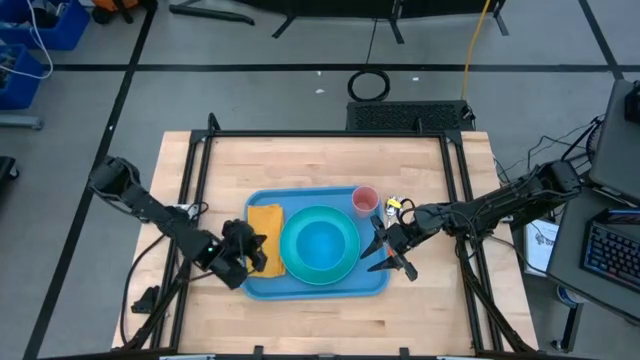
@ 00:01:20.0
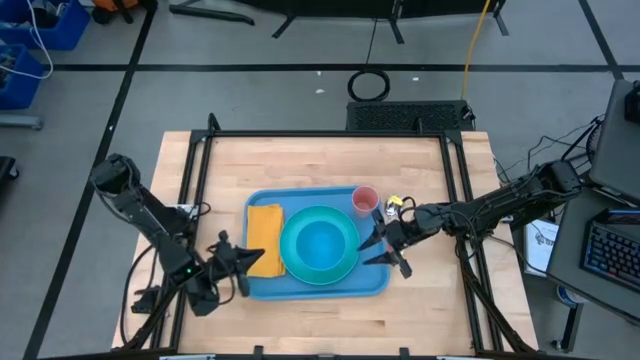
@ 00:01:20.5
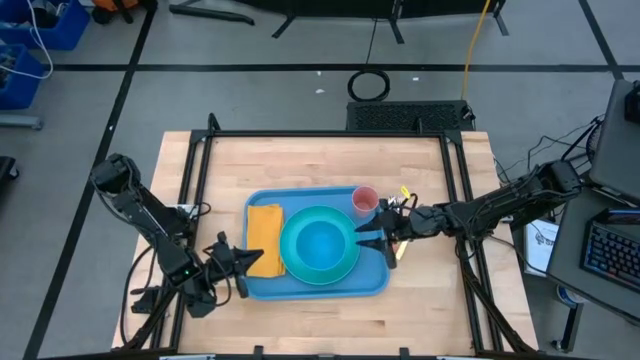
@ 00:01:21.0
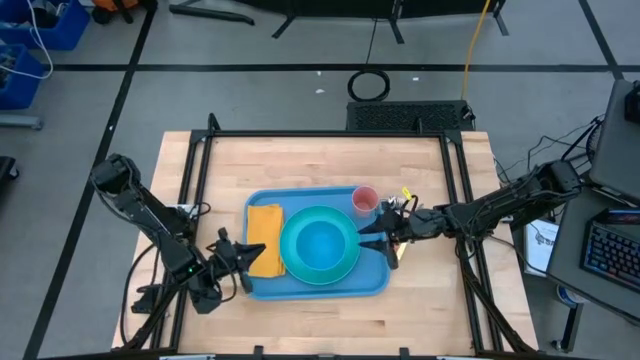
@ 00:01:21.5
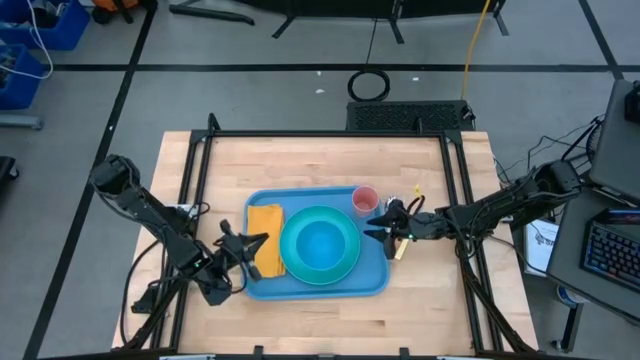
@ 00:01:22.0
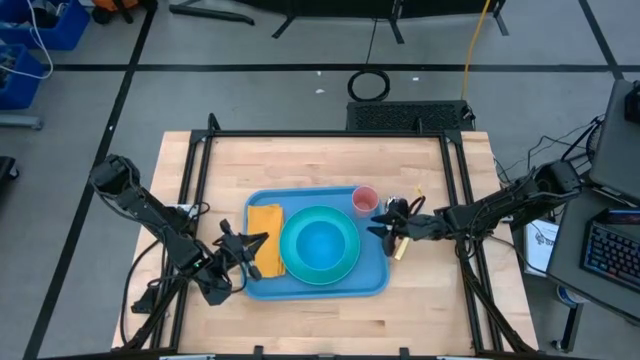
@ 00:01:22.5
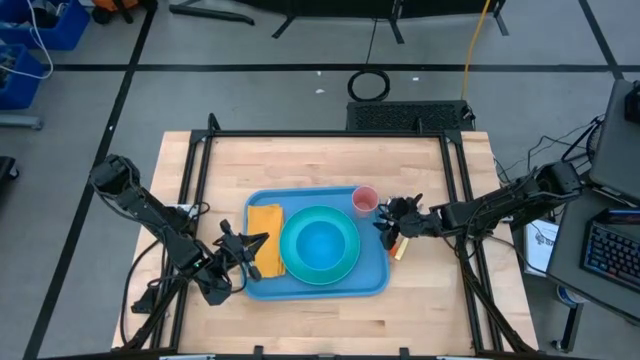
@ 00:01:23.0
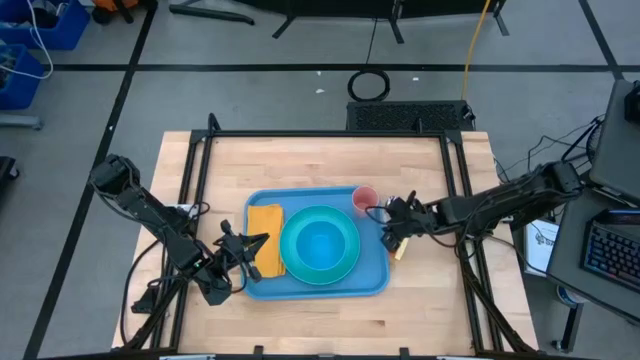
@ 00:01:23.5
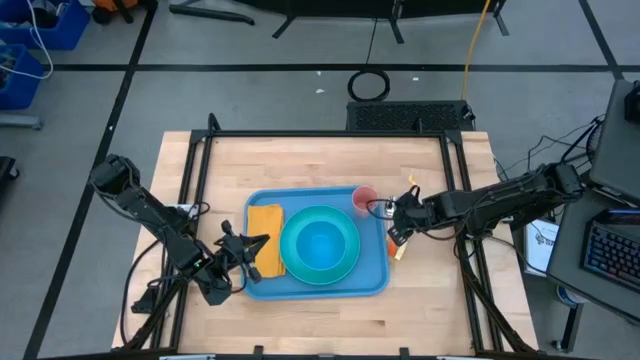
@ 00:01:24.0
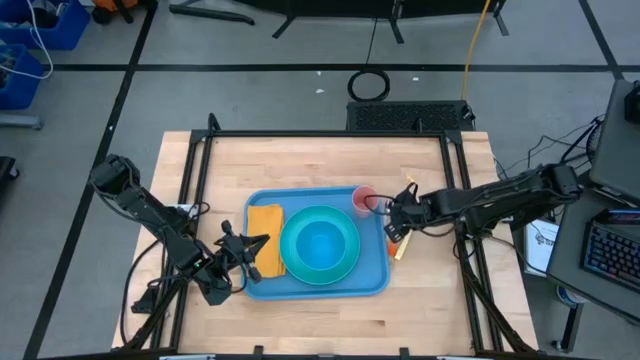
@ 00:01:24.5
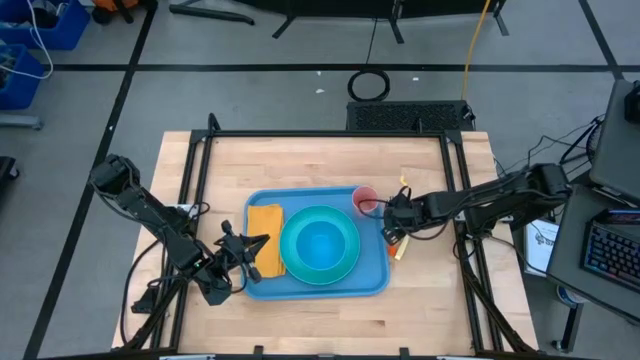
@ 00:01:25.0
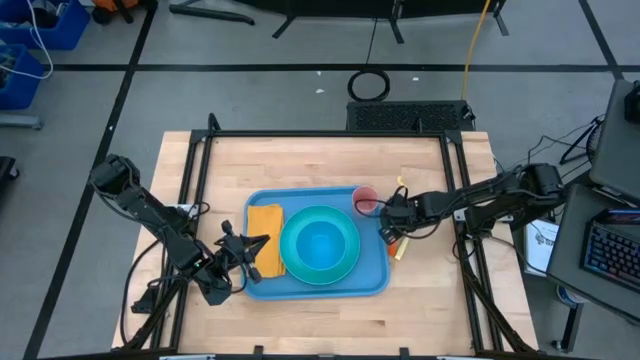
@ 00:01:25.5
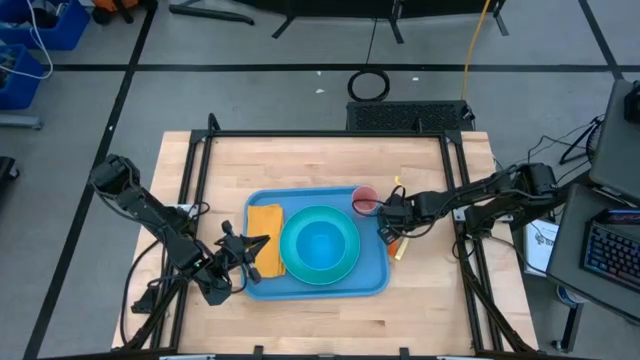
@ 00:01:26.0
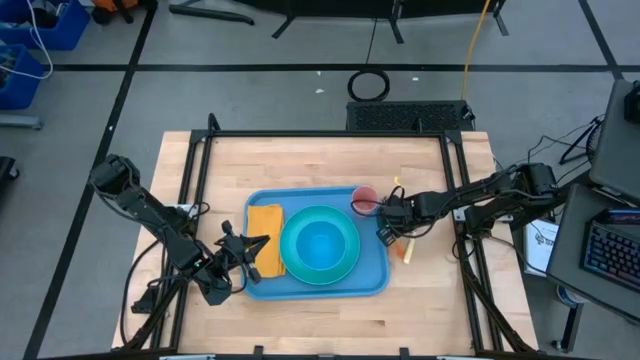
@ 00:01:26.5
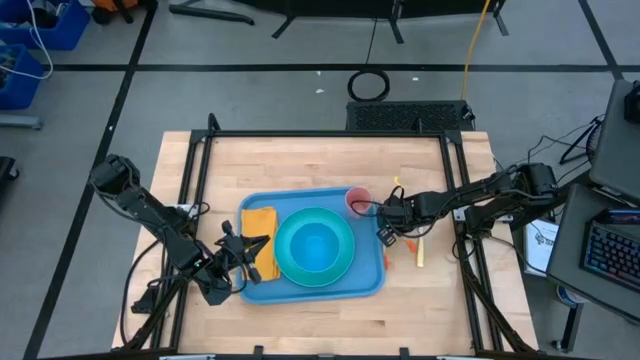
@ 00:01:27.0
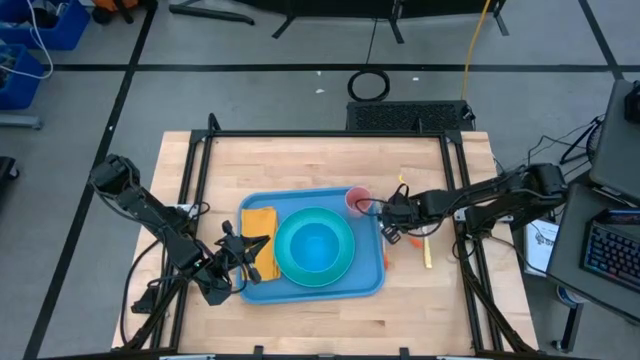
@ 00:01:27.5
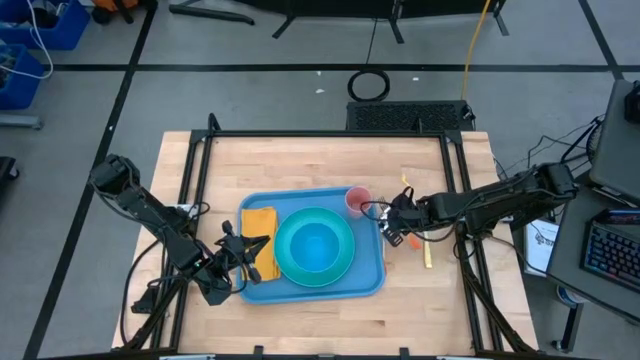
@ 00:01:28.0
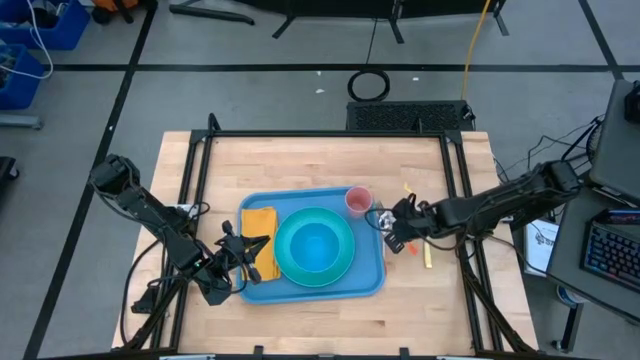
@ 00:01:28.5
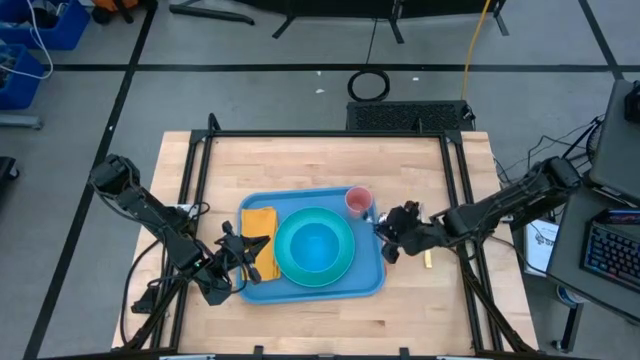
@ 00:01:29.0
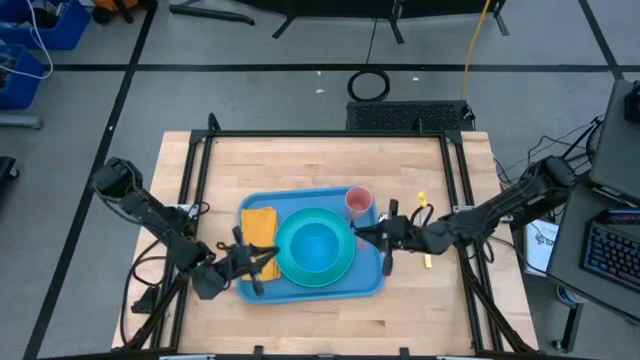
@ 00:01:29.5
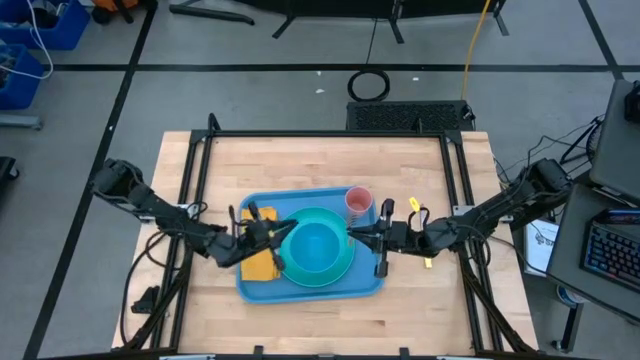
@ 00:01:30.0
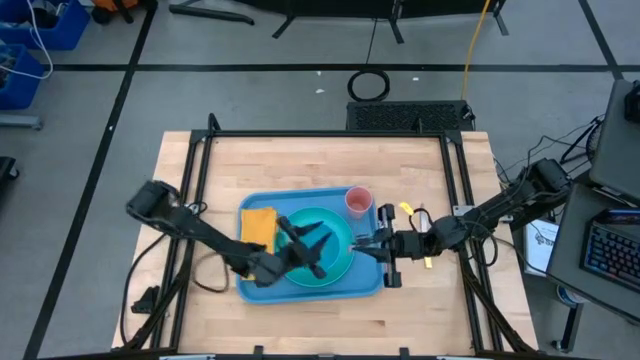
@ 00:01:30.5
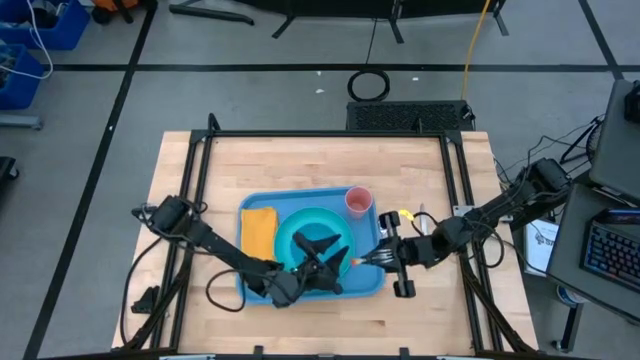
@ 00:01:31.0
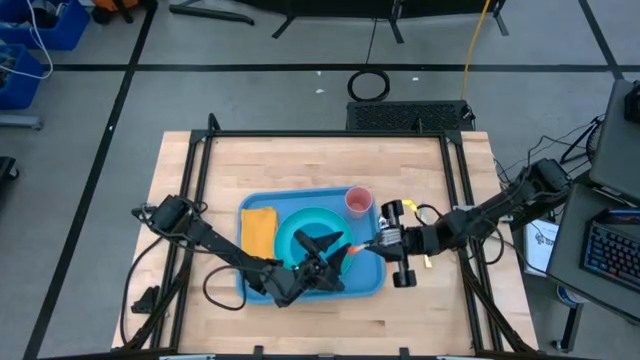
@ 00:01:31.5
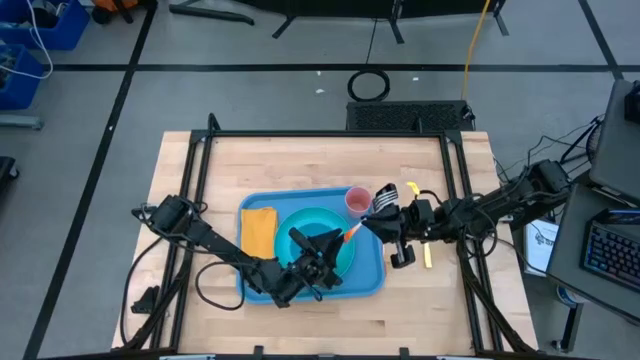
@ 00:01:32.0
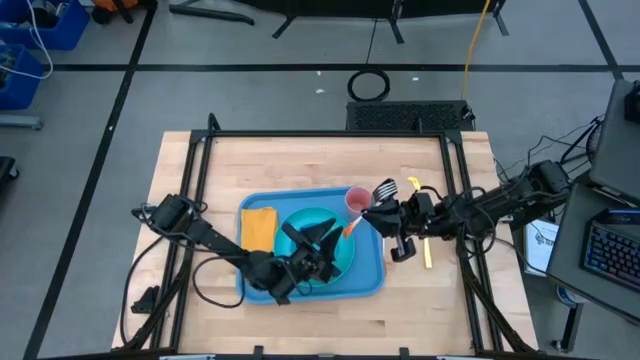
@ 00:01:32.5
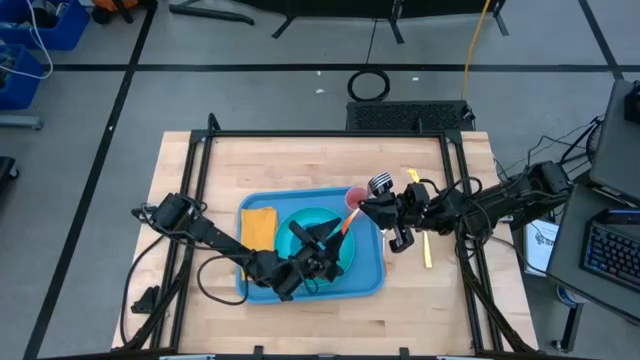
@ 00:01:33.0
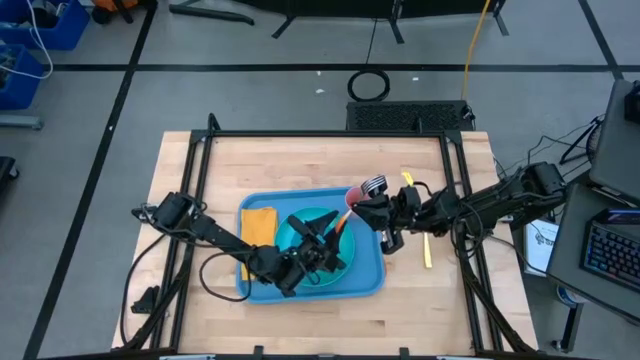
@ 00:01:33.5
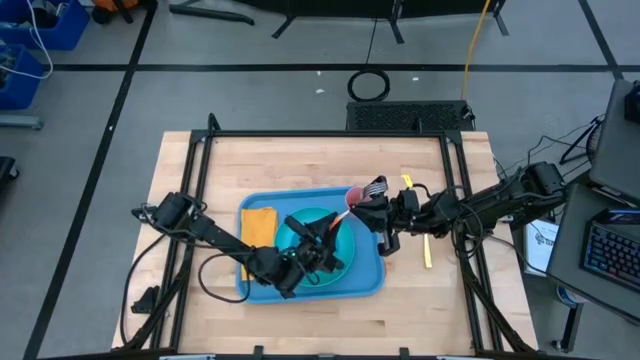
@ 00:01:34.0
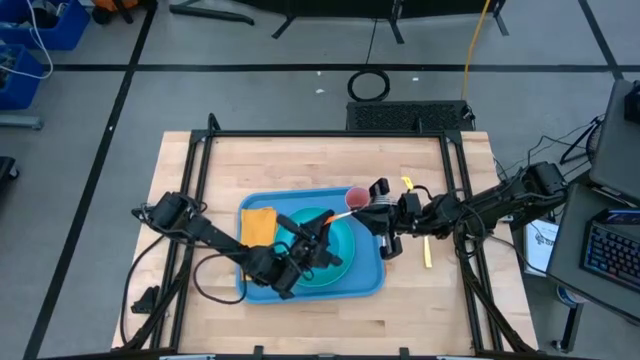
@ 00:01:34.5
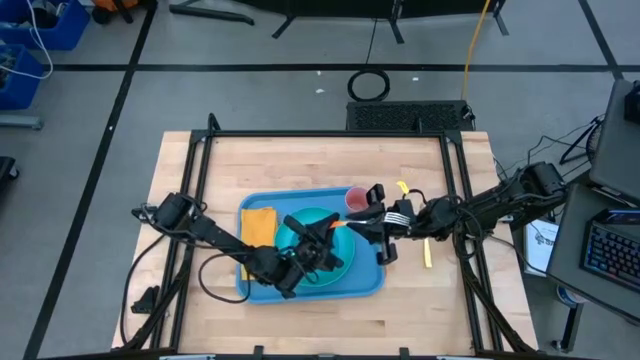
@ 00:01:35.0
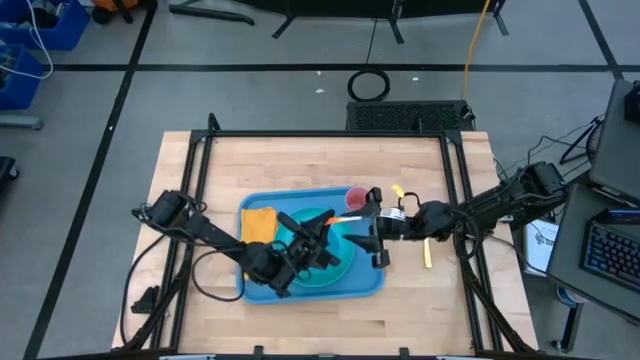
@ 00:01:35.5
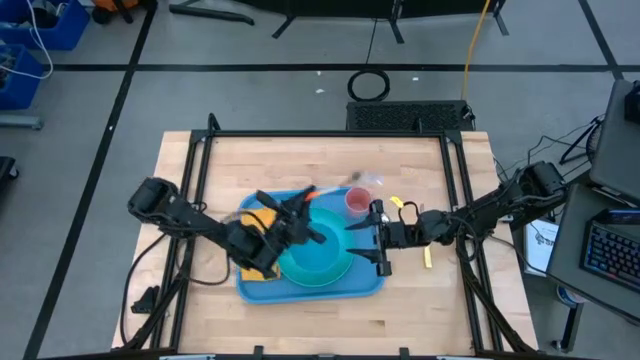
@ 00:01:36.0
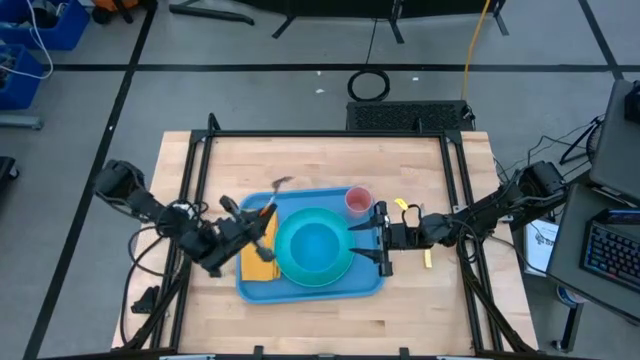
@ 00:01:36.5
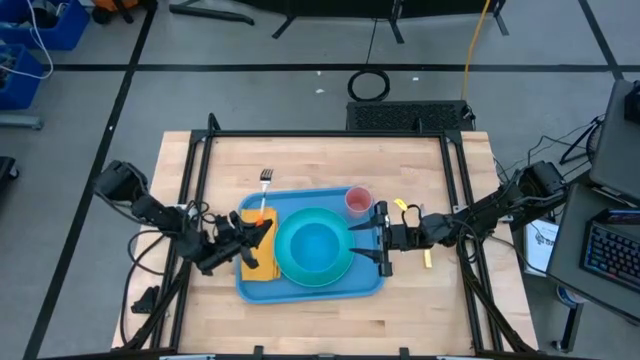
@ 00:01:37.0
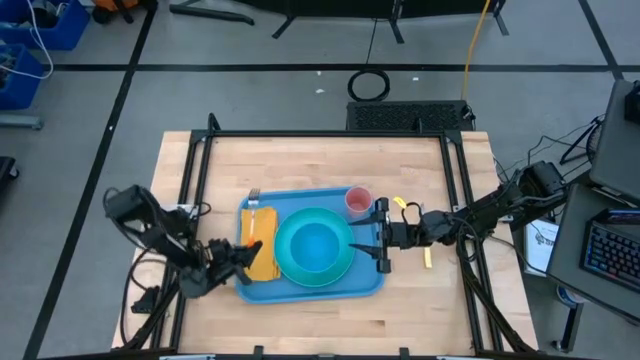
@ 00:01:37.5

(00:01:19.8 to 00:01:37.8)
Task: Set up tray
Put the orange fork on the yellow napkin
